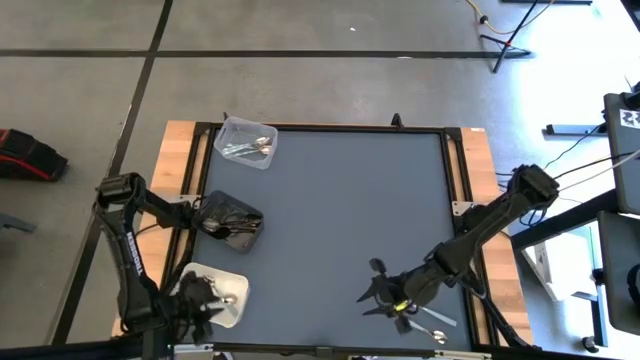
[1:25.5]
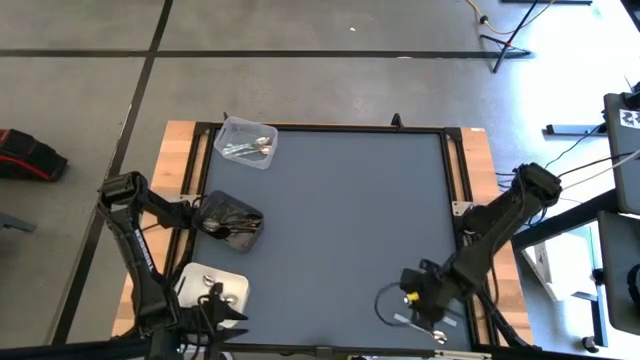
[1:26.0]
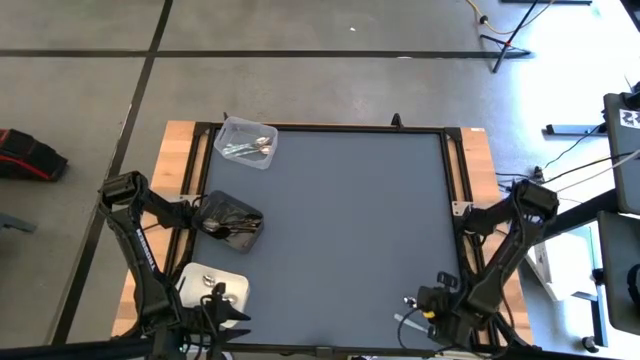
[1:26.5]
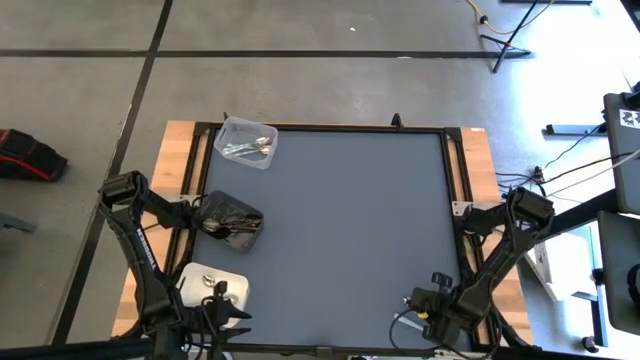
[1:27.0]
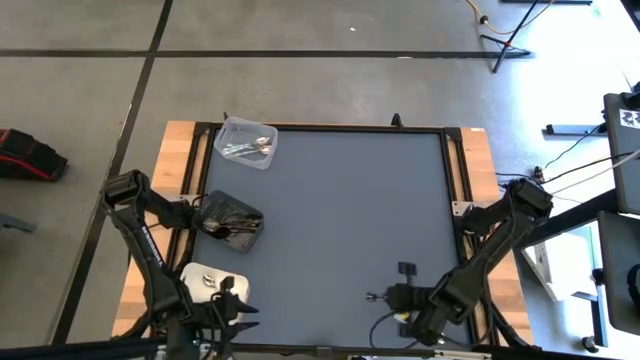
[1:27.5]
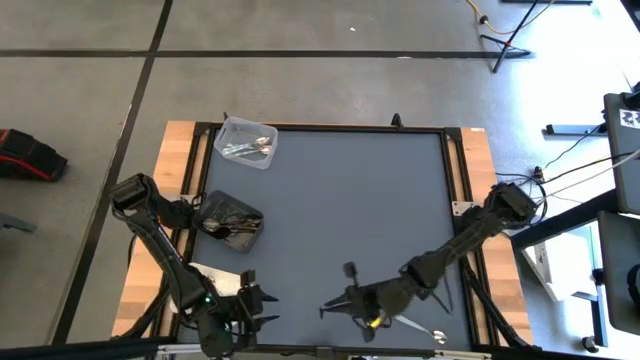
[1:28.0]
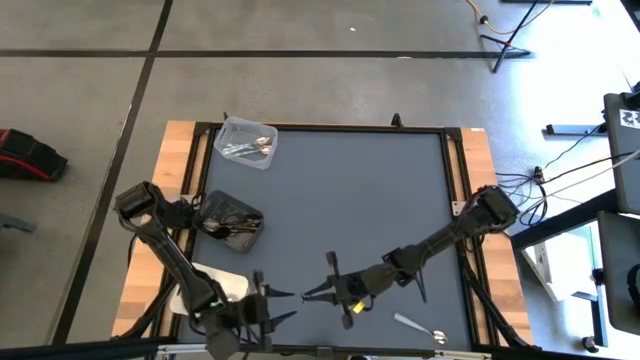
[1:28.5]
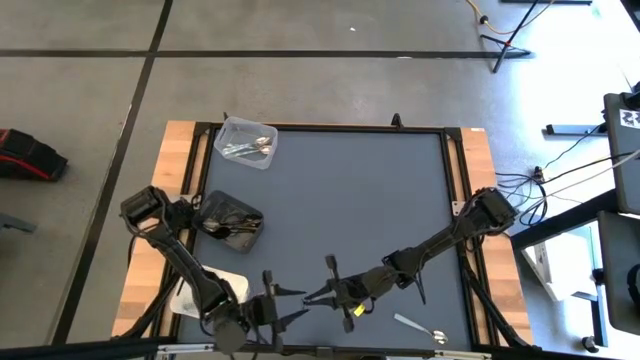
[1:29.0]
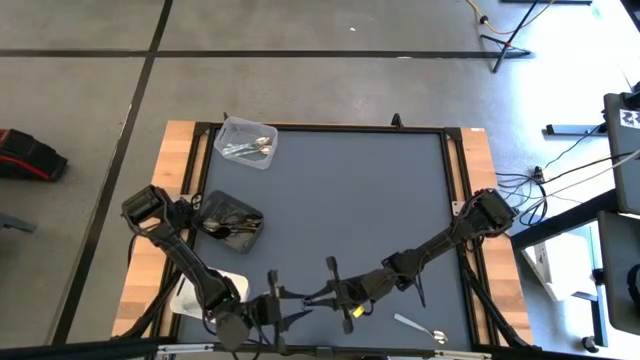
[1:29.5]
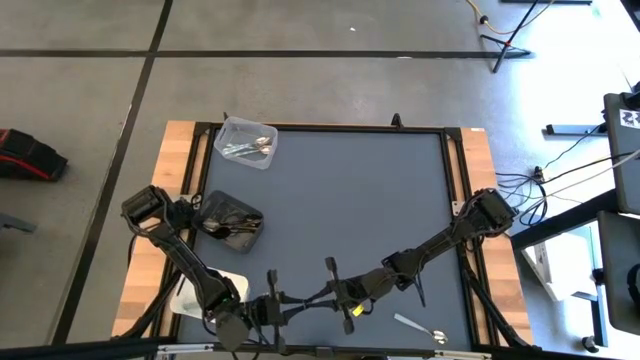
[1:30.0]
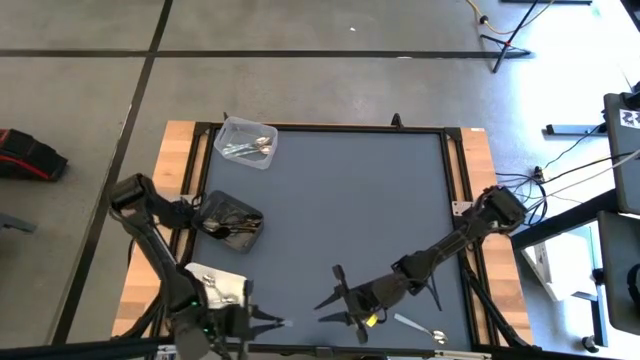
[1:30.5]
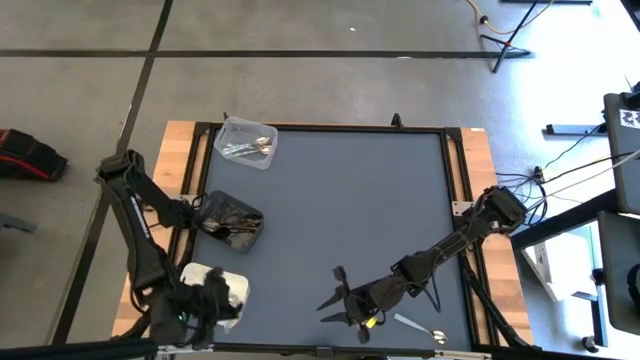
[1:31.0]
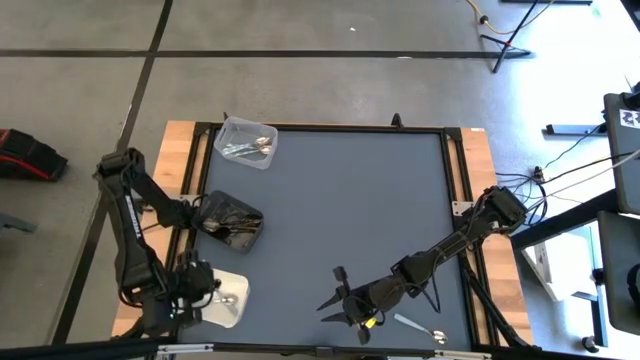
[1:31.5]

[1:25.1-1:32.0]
Task: Sort silverware by color (type)
Put the blue spoon into the white bin

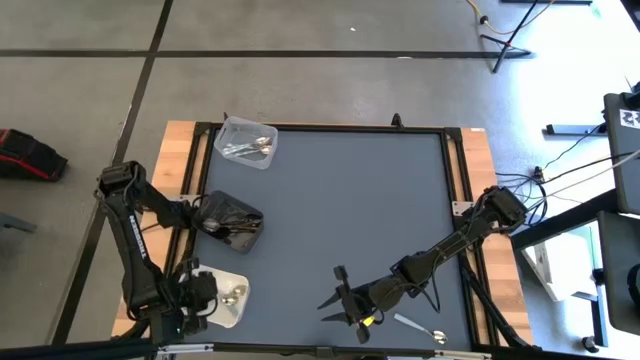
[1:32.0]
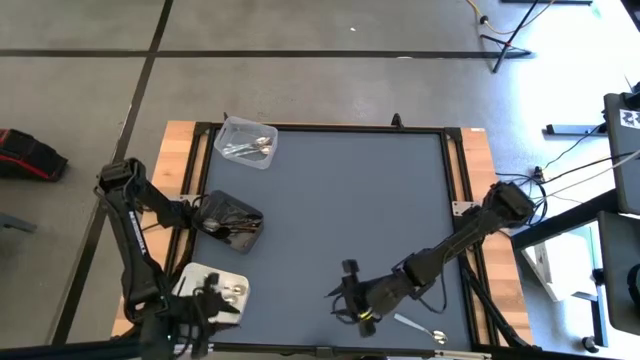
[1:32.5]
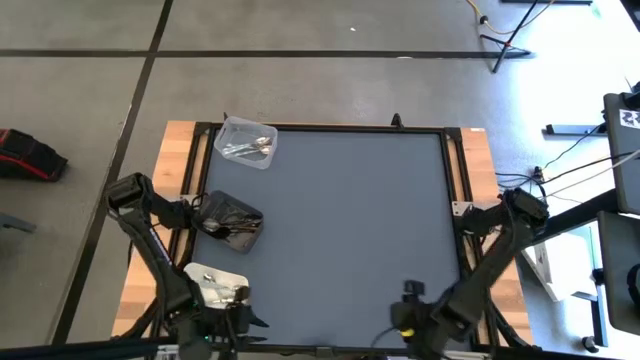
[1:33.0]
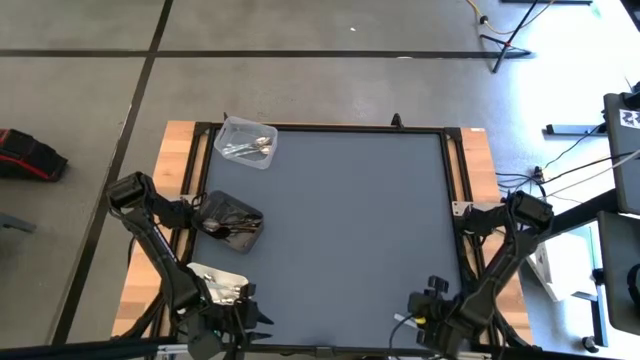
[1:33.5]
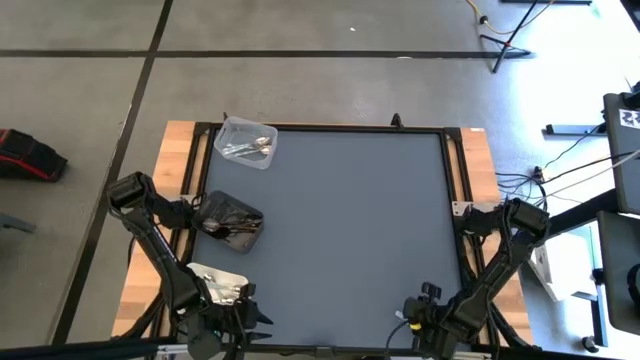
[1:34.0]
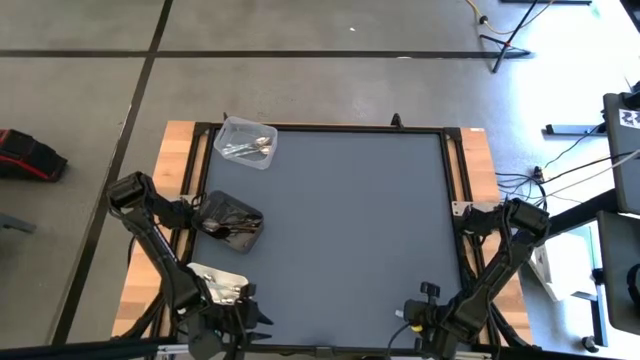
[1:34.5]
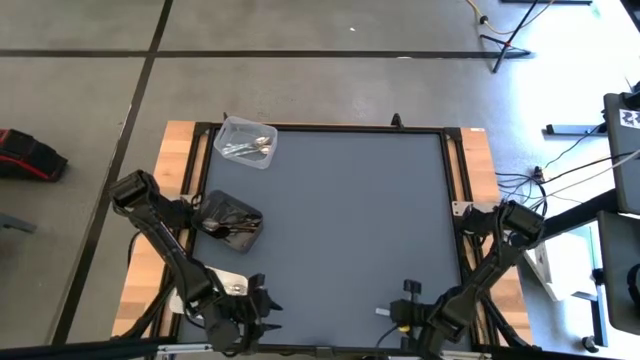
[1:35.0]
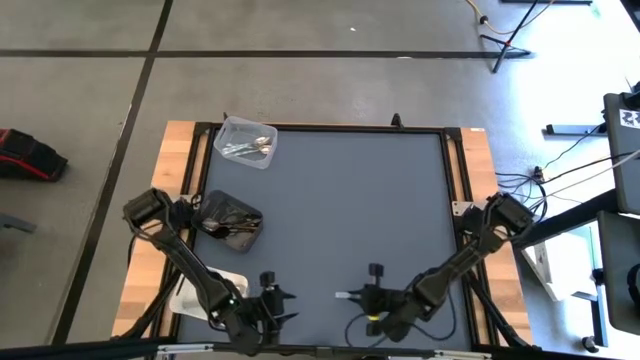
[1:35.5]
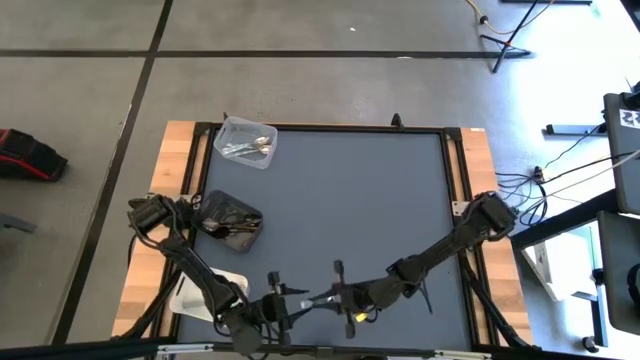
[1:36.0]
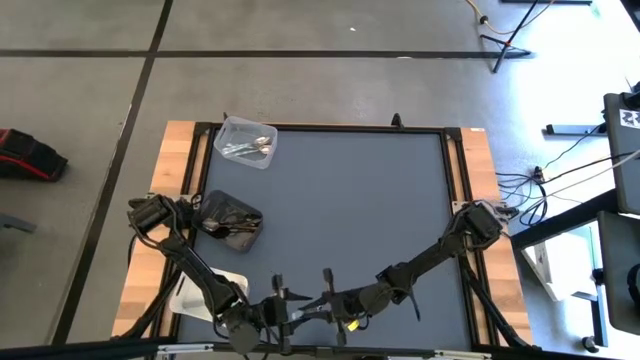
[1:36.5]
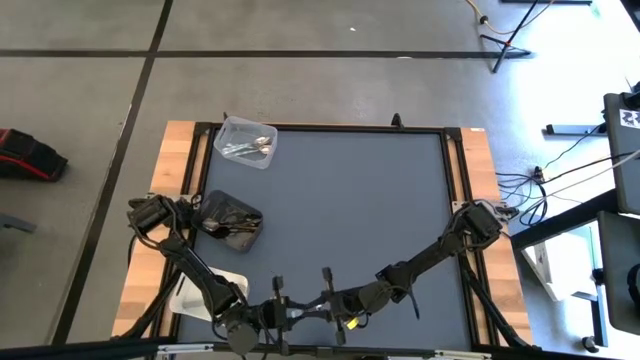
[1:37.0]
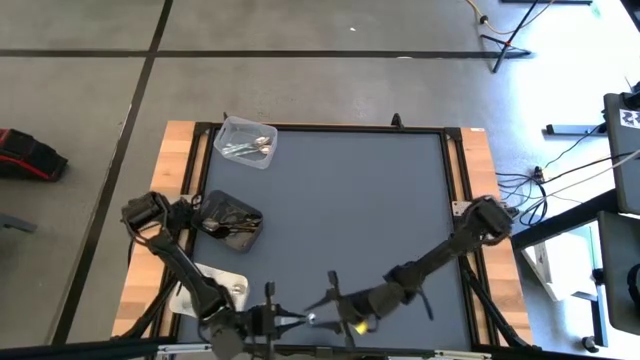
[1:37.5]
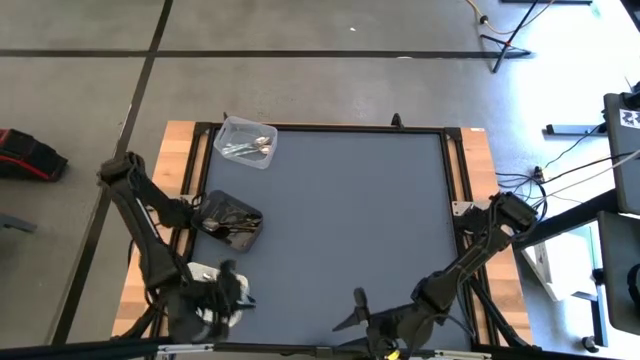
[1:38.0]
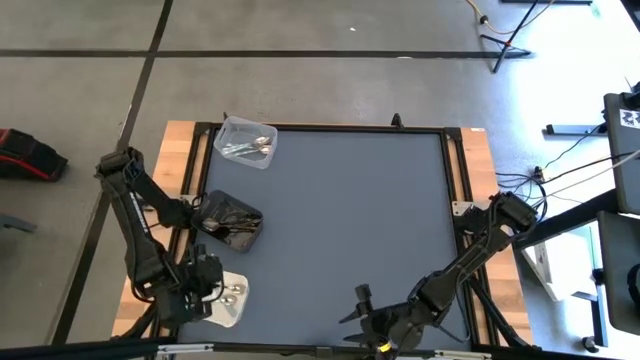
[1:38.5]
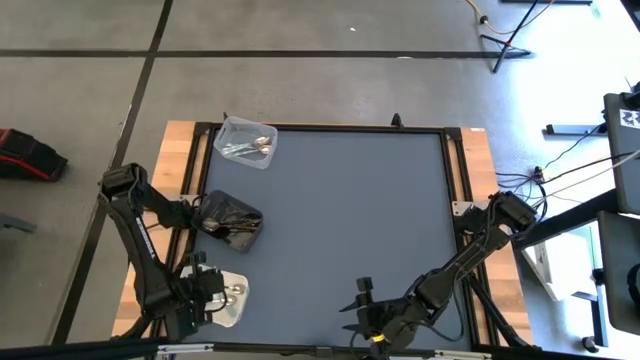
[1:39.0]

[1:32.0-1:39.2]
Put the blue spoon into the white bin

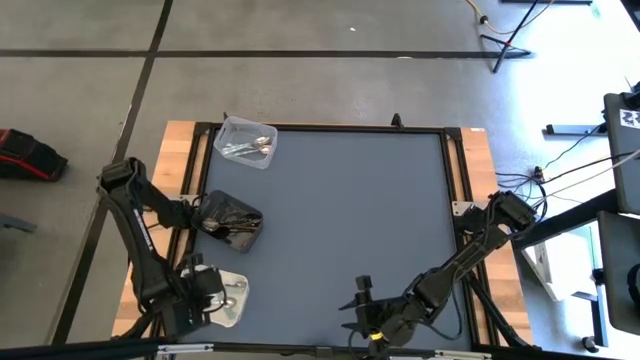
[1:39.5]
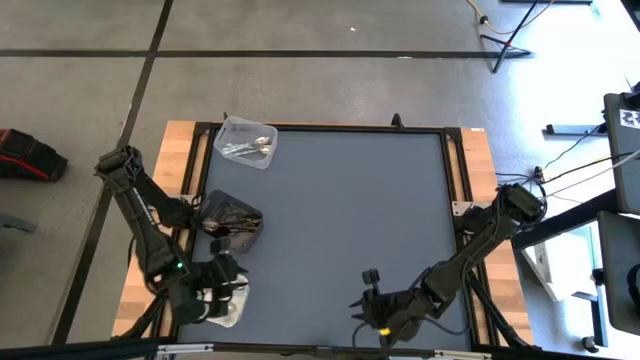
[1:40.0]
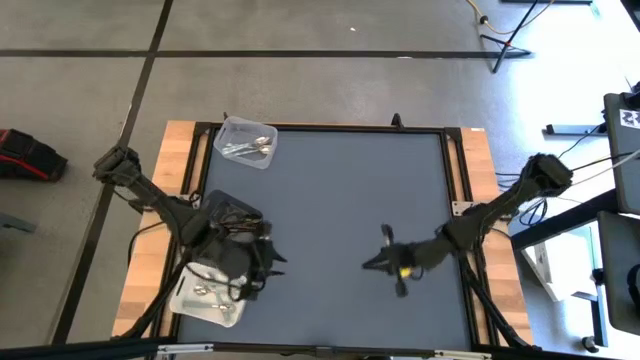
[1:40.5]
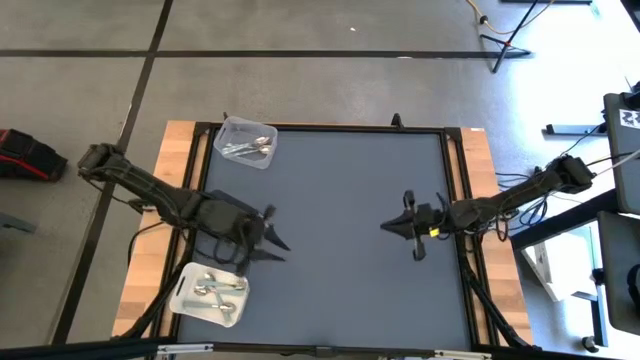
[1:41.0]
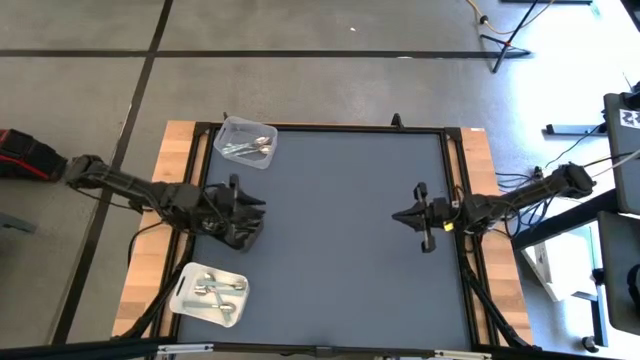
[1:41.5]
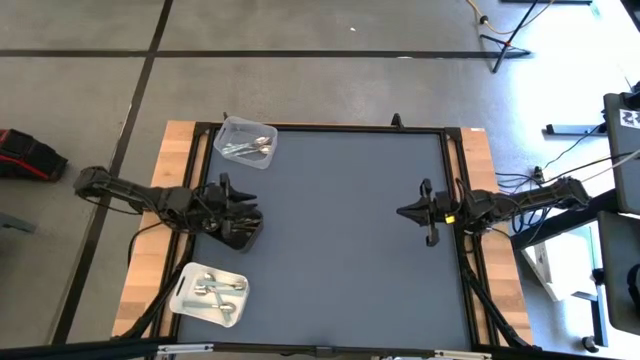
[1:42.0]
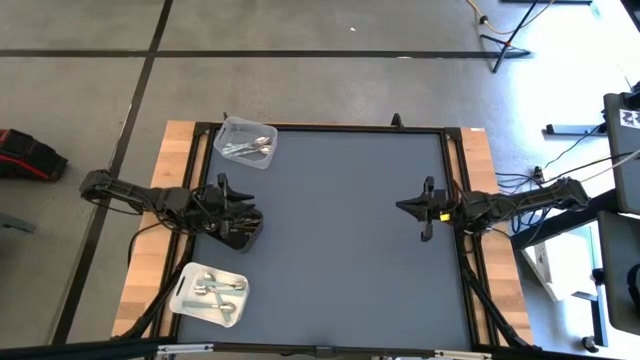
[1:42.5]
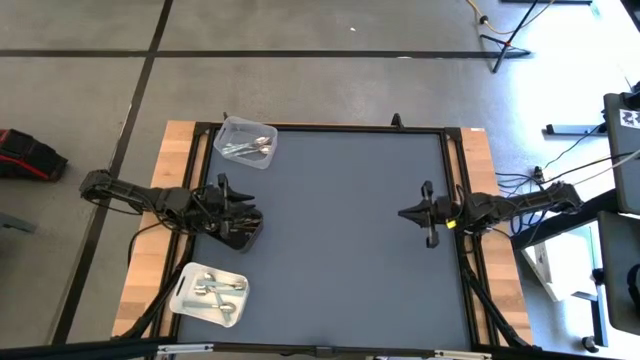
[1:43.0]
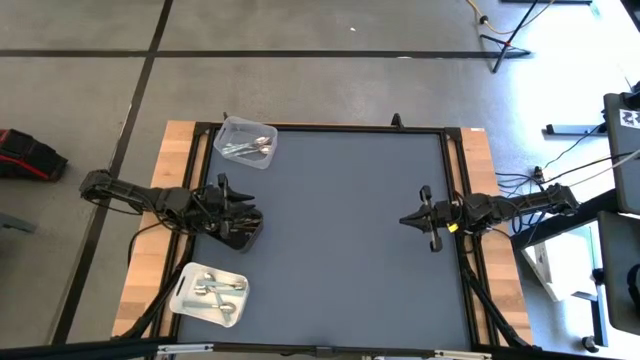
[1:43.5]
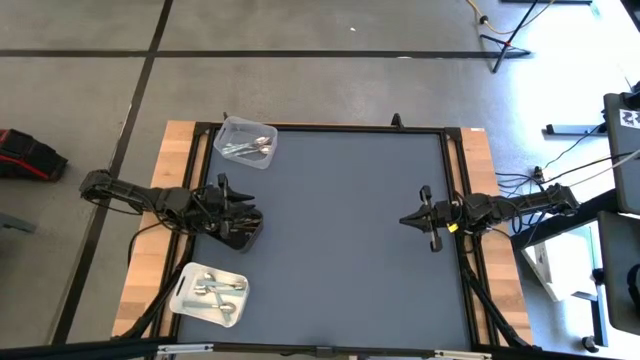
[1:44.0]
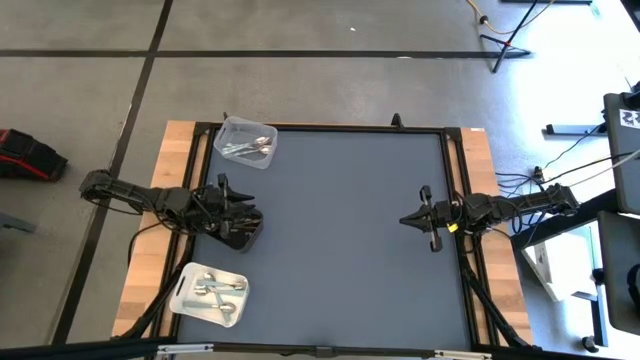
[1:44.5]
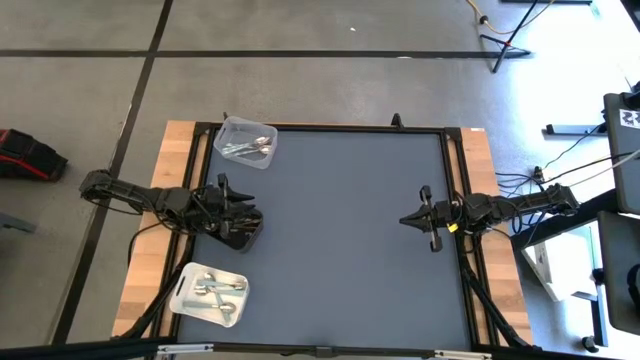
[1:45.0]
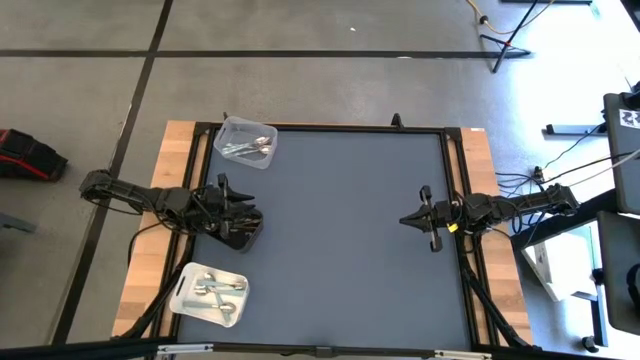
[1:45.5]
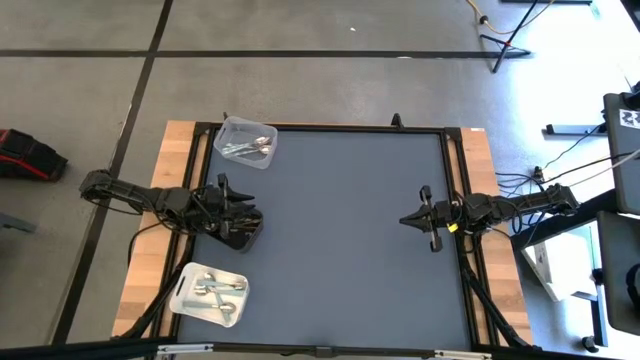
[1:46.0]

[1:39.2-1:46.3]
Return to Home Position

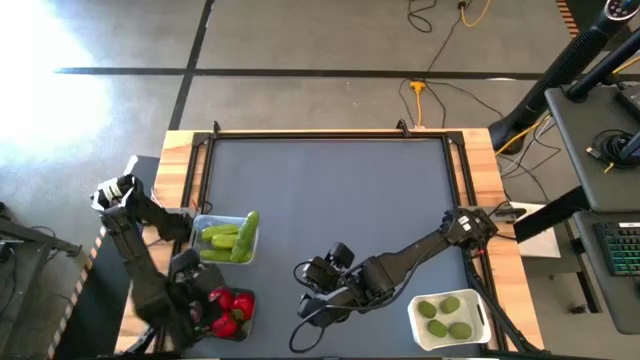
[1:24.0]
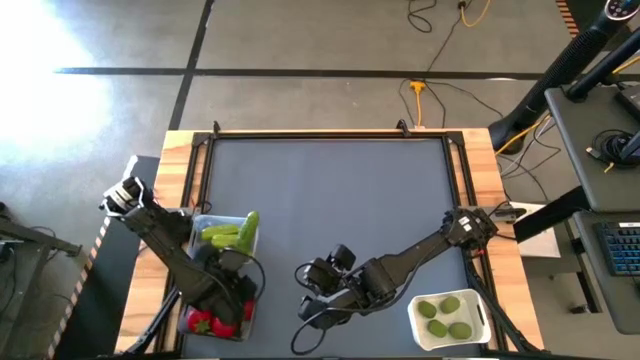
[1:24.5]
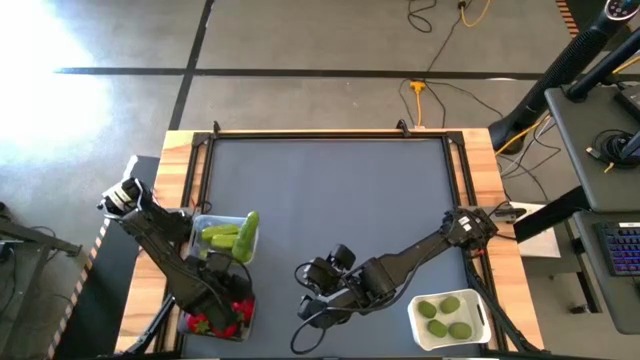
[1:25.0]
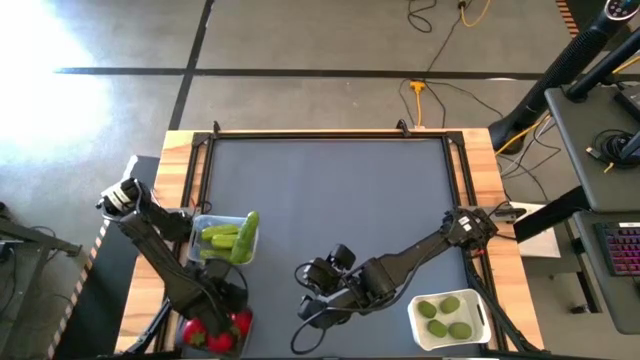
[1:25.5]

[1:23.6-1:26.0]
Task: Sort produce into baskets
Adjust the black bin
